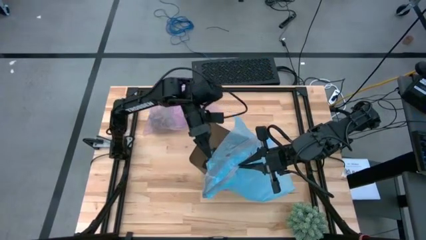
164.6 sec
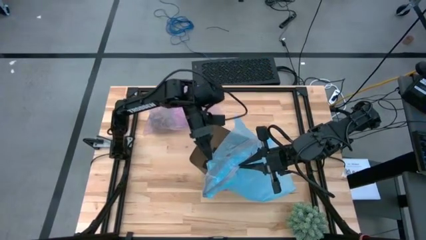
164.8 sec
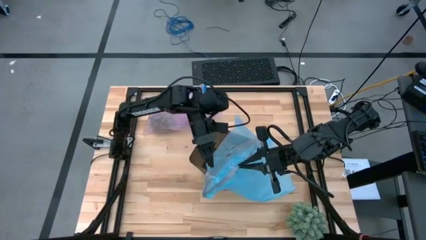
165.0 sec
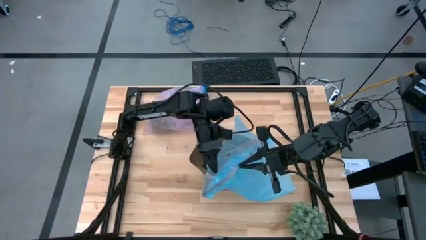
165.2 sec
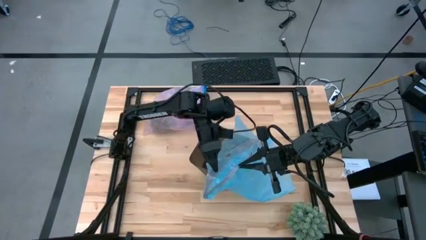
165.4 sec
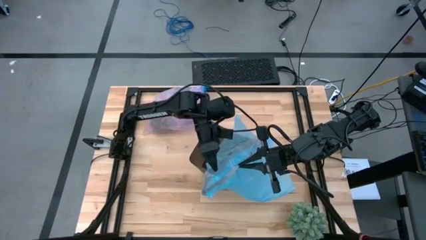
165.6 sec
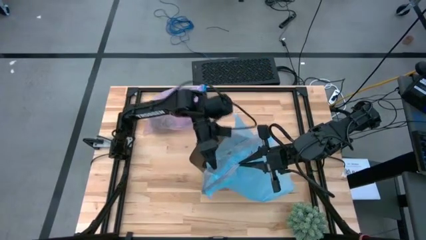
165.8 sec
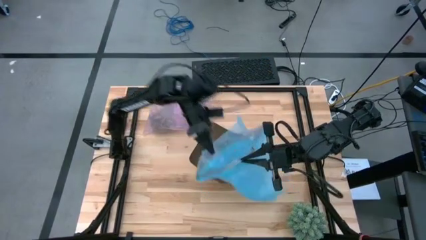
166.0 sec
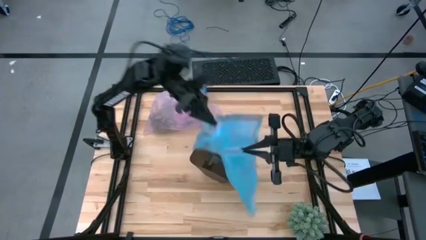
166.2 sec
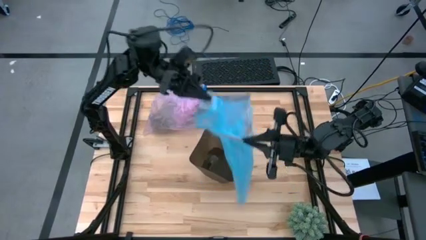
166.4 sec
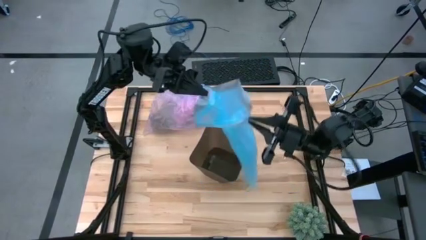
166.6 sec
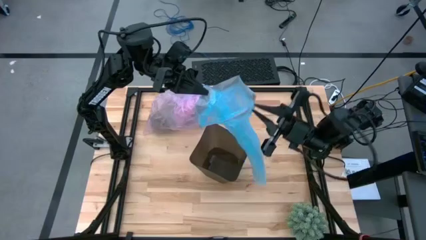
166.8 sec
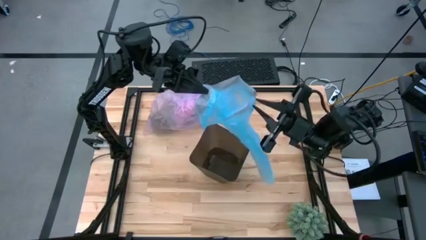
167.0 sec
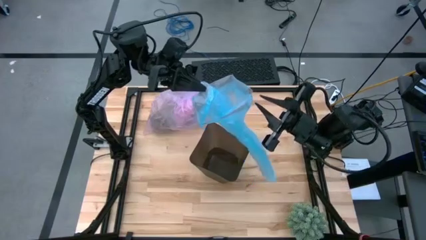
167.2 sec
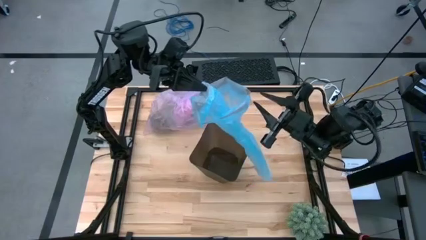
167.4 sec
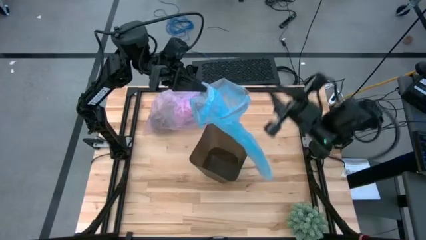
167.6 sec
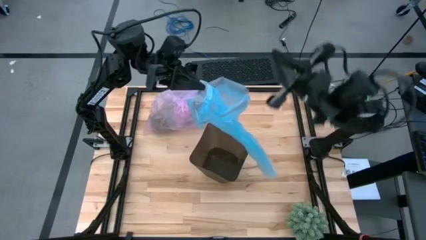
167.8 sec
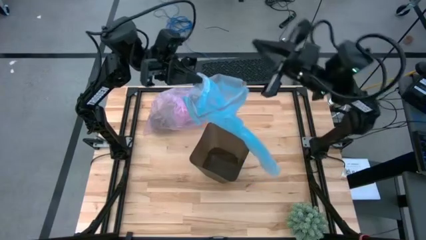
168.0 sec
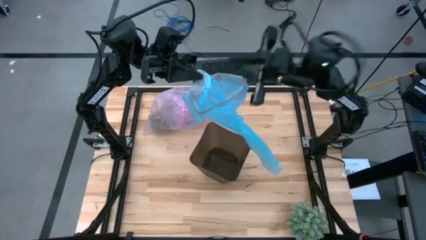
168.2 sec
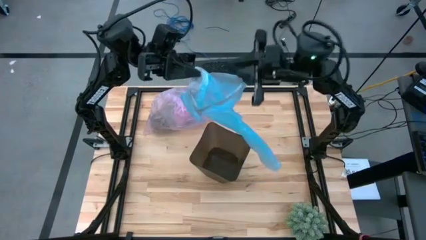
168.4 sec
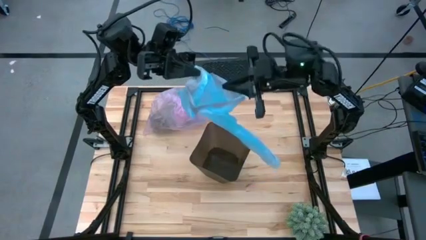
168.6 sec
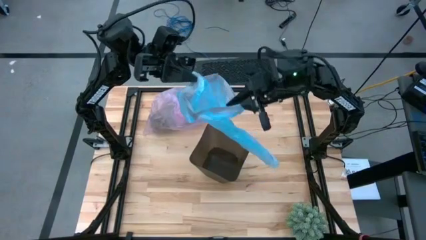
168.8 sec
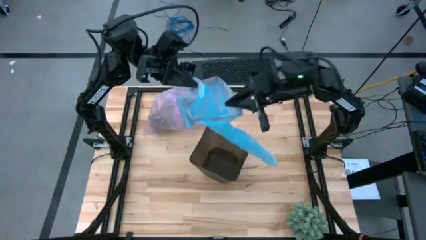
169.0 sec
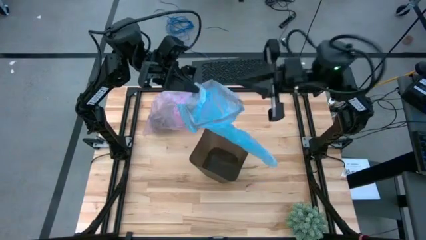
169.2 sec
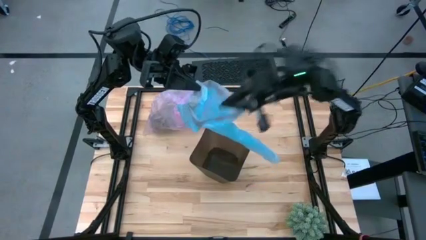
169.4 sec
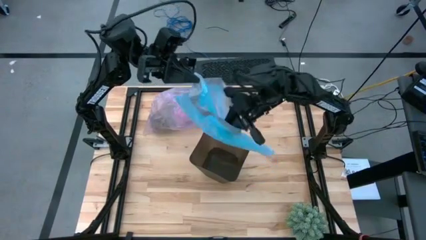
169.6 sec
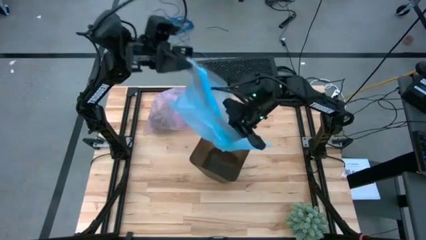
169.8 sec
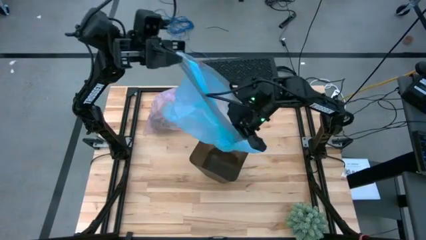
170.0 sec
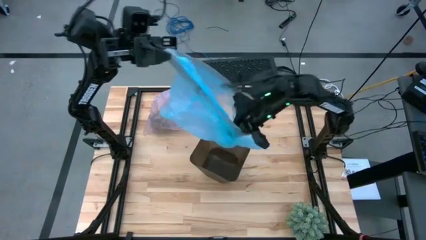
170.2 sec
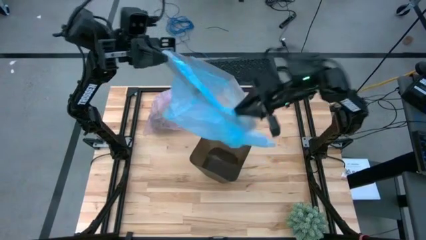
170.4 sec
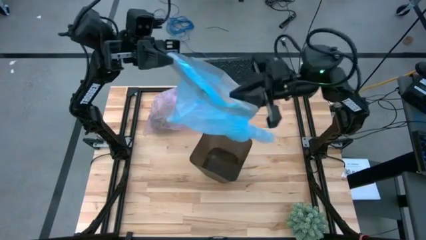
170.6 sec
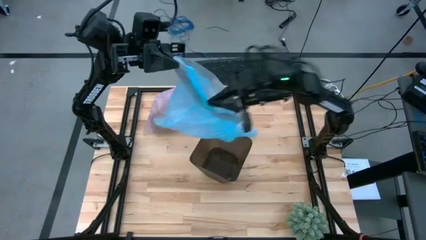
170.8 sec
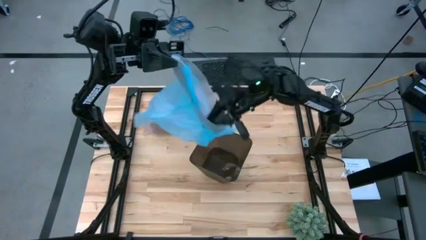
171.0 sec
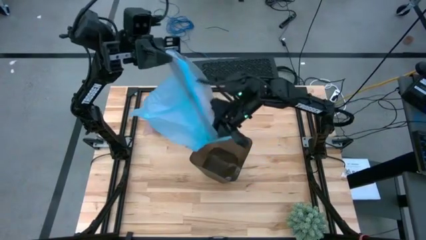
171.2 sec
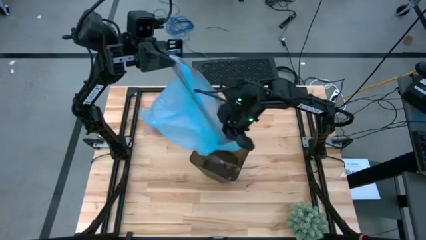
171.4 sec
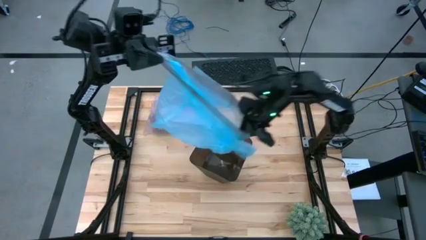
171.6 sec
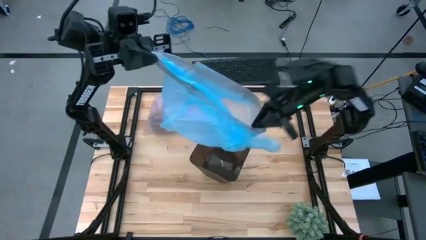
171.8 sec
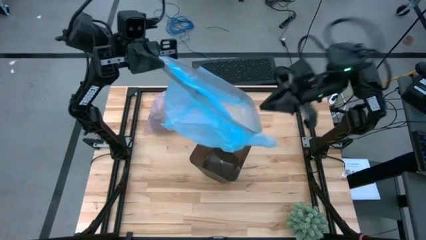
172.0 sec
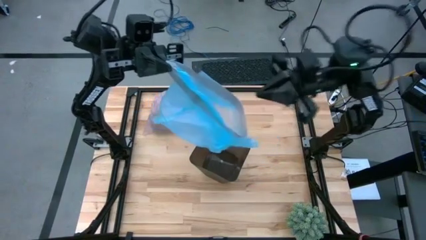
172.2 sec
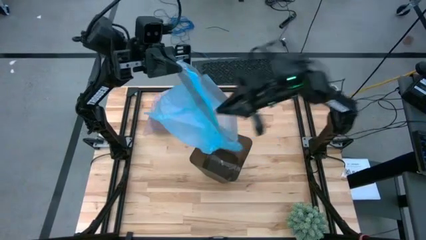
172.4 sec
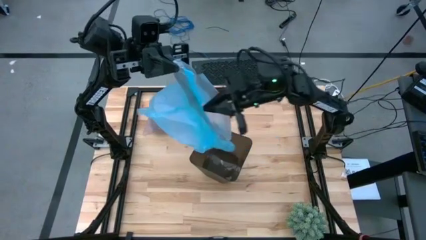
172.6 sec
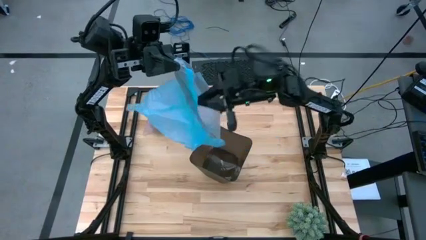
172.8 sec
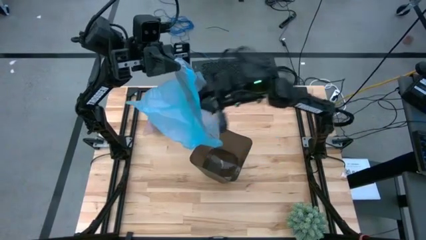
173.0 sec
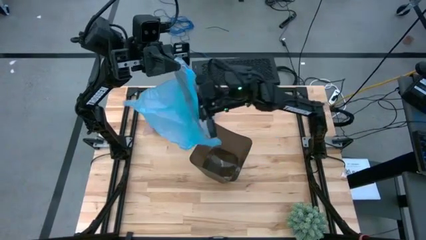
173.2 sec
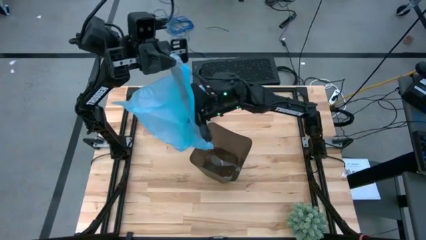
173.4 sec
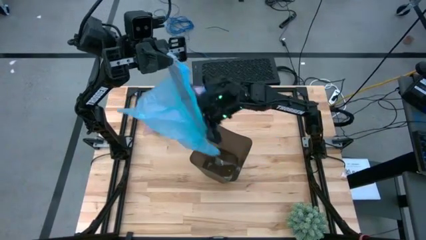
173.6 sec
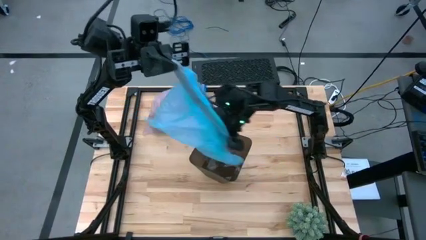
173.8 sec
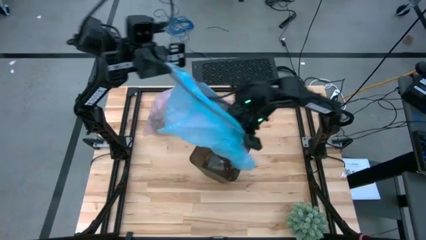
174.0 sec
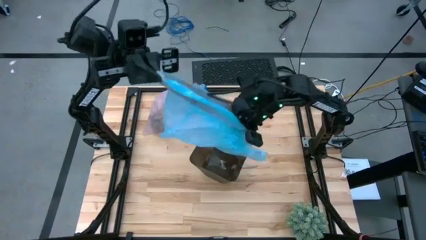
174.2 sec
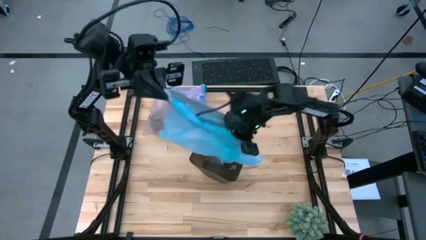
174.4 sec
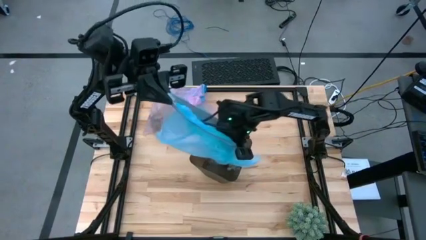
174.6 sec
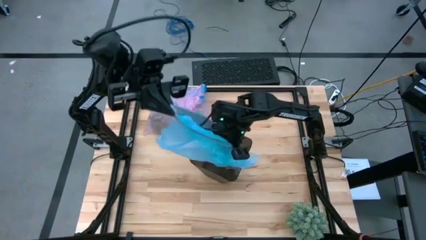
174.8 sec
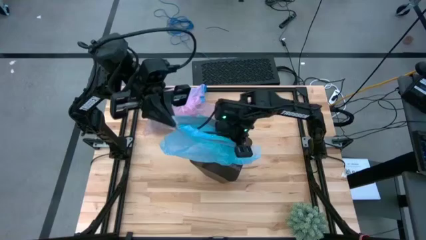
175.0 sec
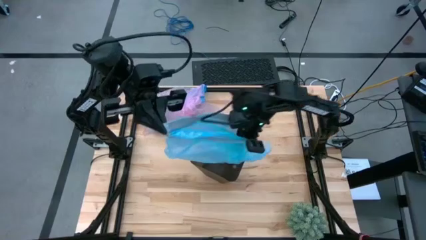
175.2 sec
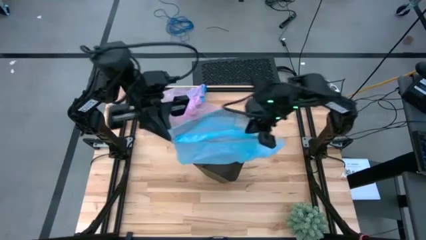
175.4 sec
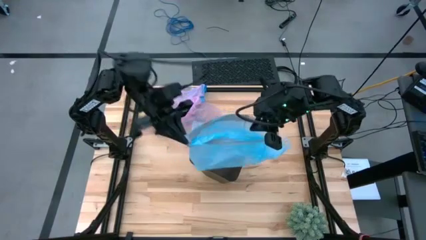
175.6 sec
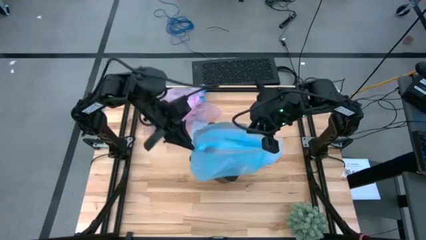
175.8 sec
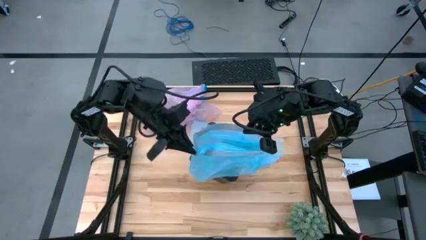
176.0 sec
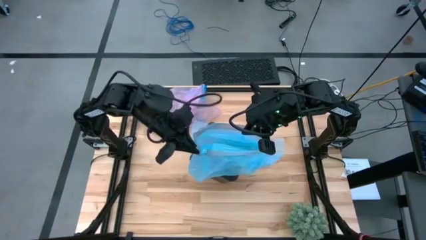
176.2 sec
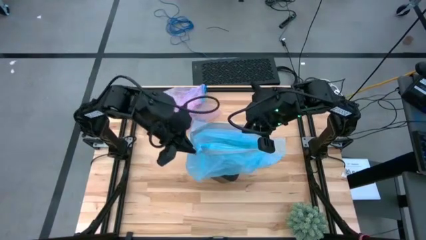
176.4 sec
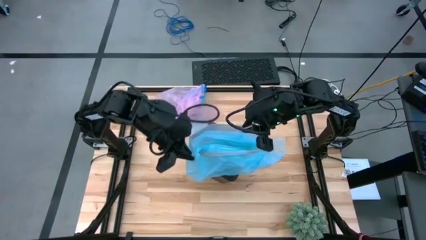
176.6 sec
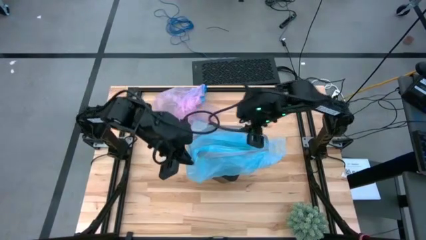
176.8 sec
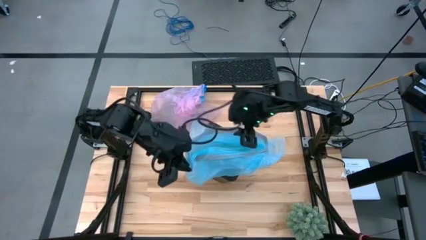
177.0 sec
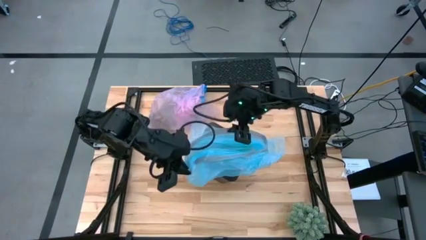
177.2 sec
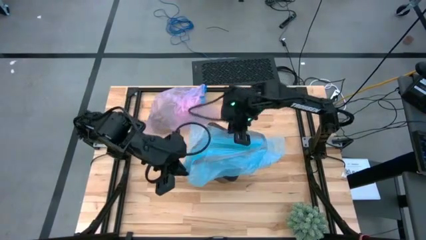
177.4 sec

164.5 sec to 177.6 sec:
Task: place trash/remove bag and relplace
Insert the new trash bag into the trash bin
